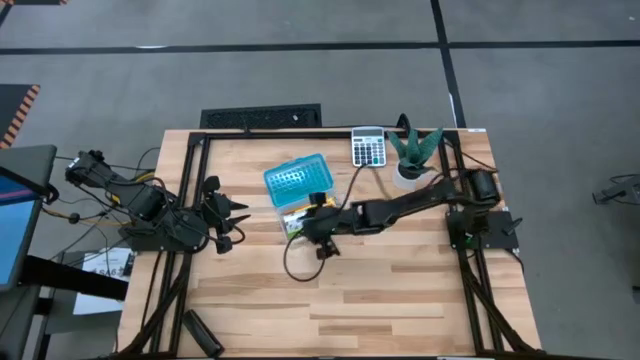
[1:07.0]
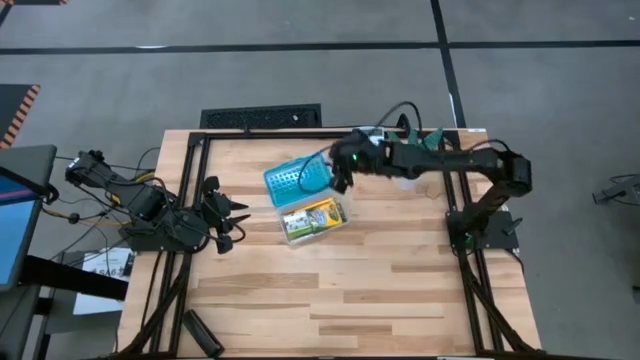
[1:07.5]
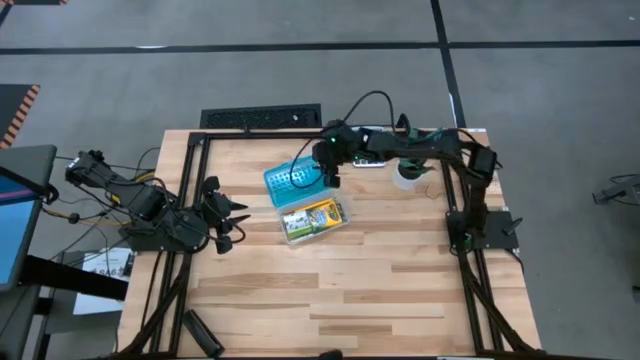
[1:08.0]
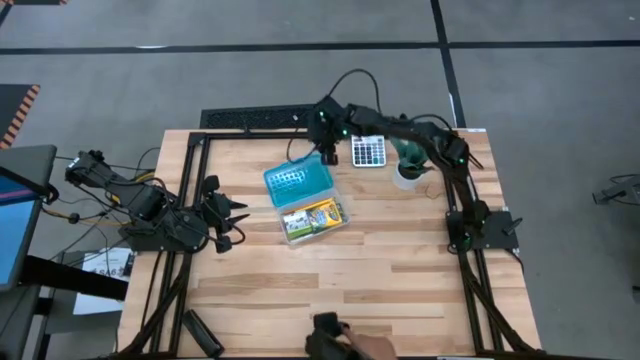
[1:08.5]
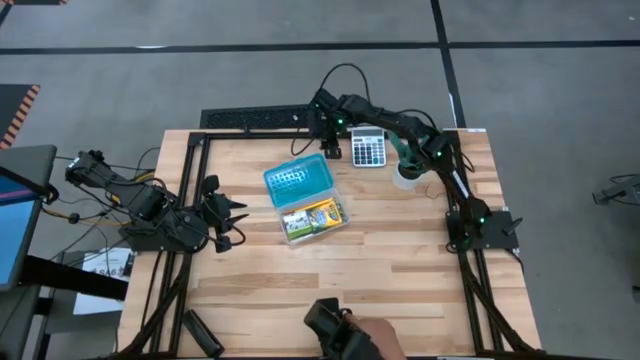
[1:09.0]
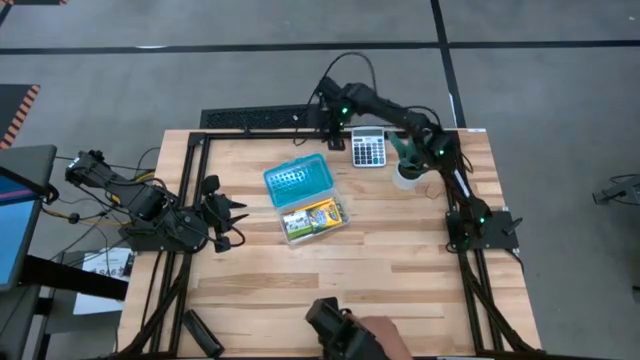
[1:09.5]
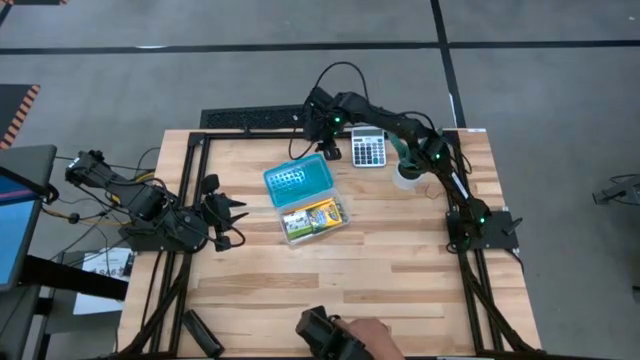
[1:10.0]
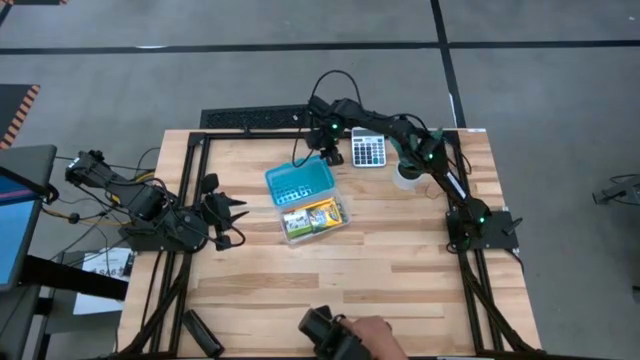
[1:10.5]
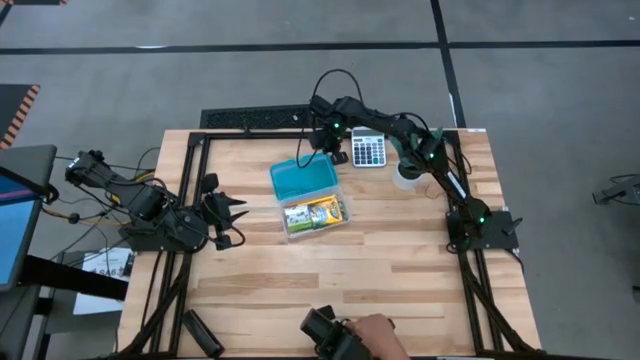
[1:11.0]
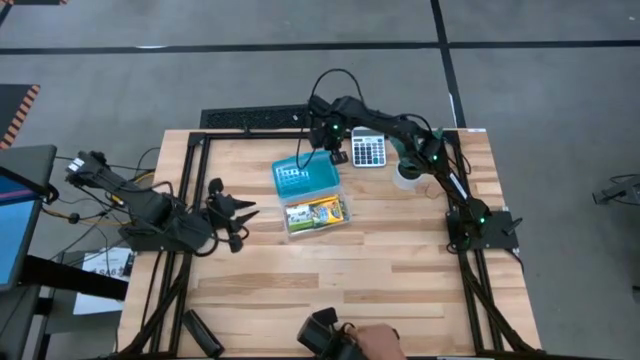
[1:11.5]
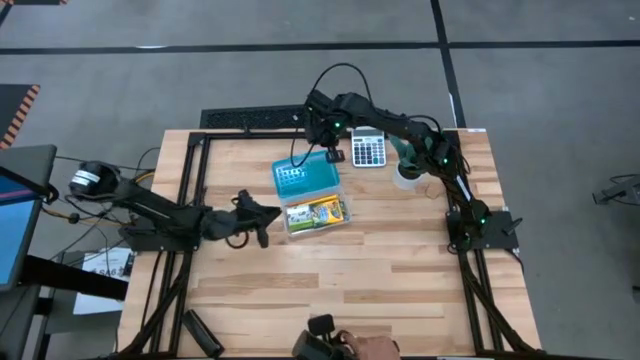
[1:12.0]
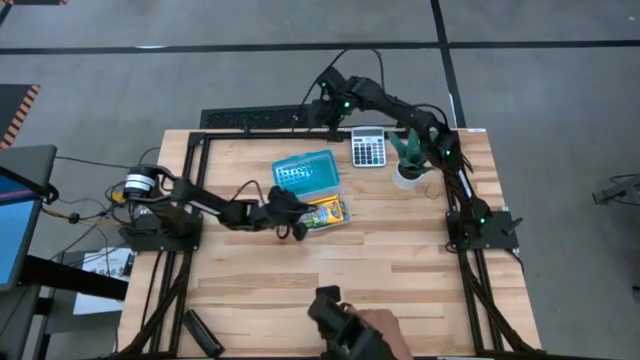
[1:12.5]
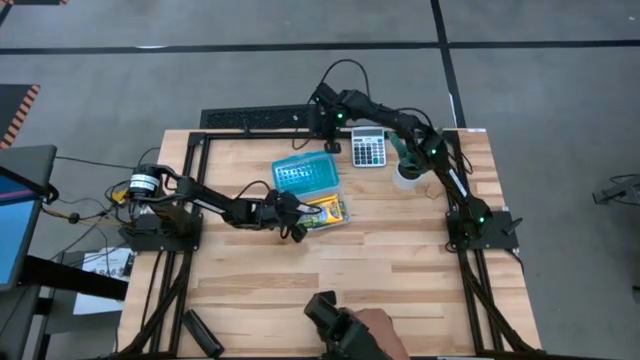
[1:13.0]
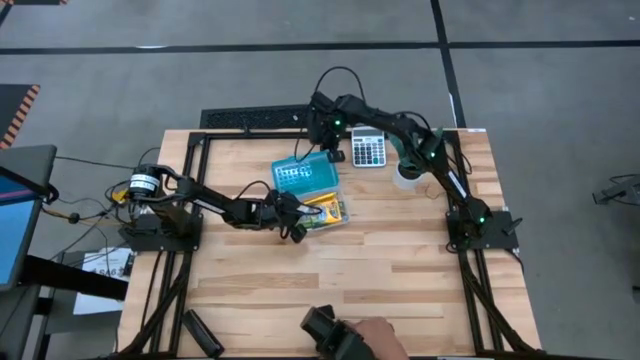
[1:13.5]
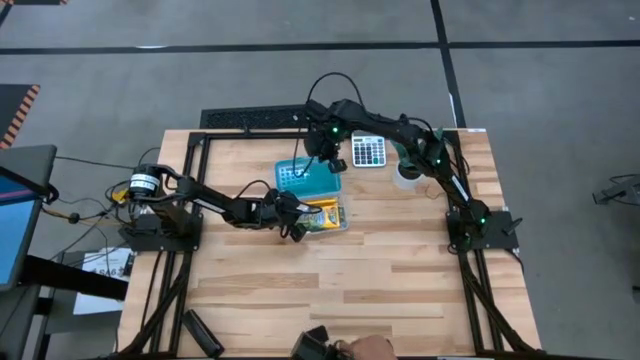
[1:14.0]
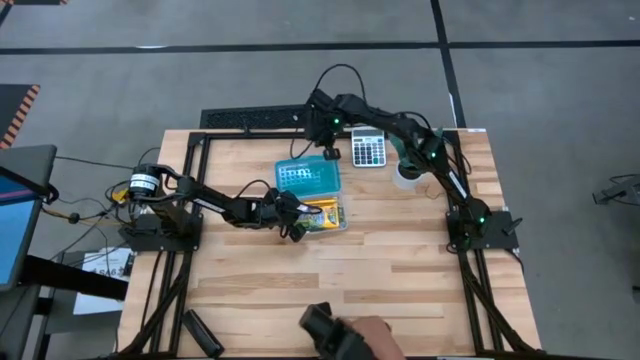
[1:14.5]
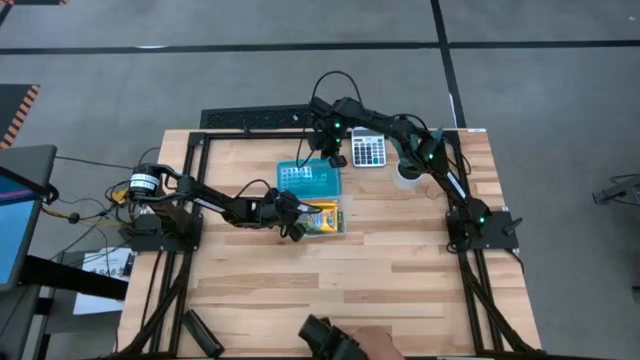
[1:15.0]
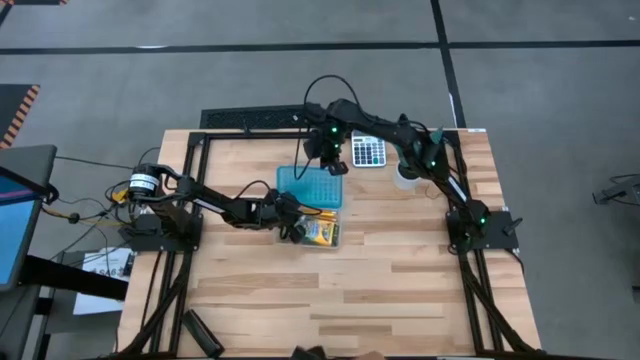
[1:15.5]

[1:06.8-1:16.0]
Task: Pack school essentials
Close the supply box

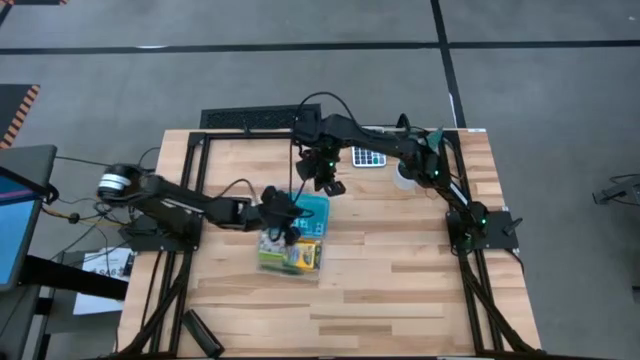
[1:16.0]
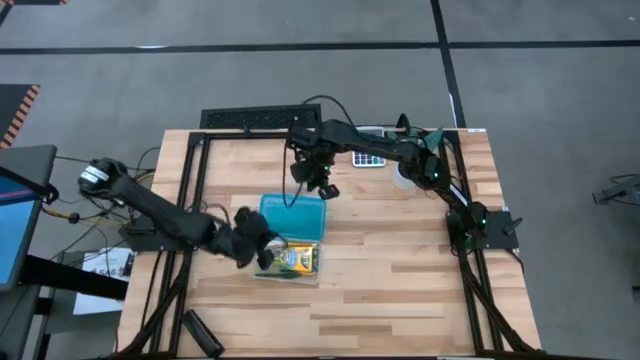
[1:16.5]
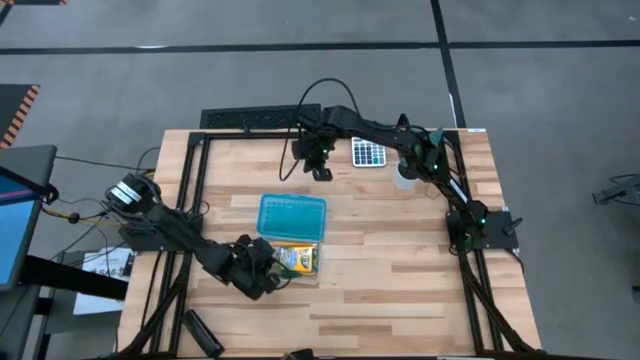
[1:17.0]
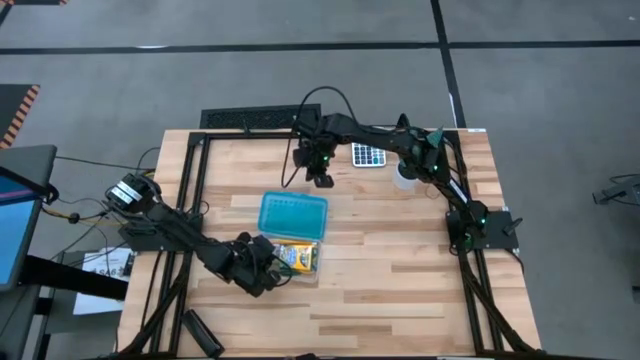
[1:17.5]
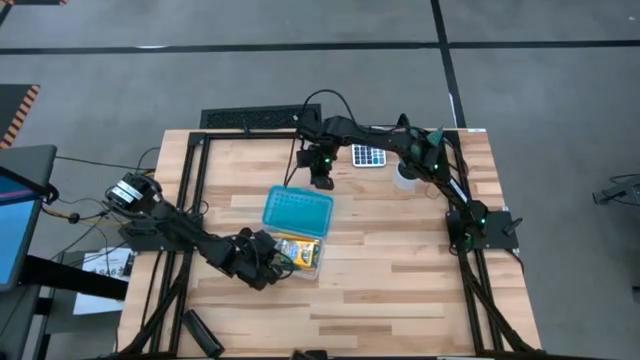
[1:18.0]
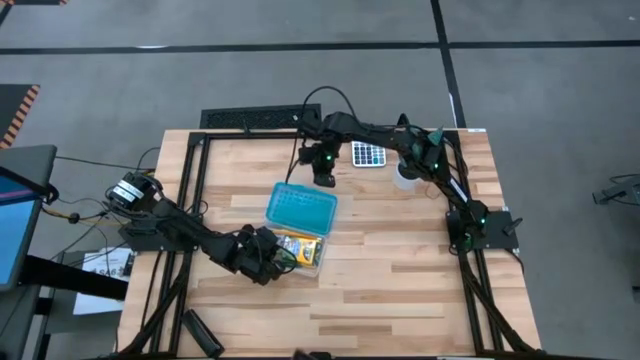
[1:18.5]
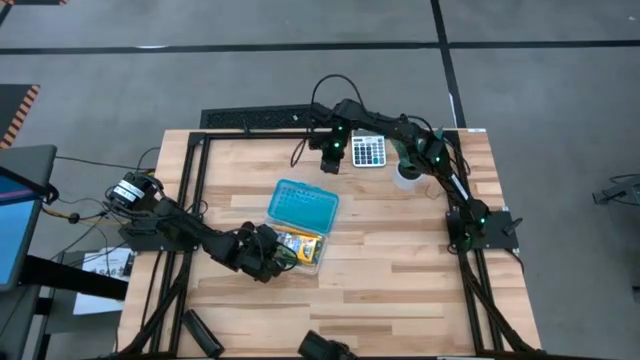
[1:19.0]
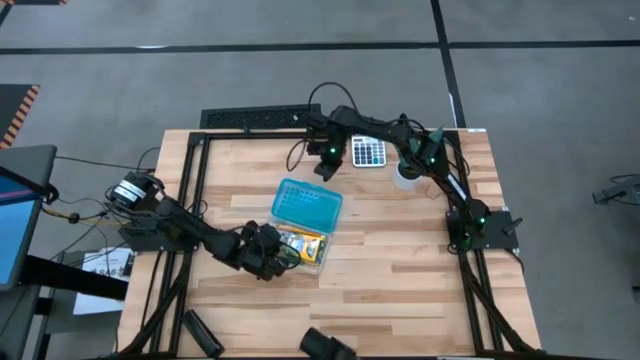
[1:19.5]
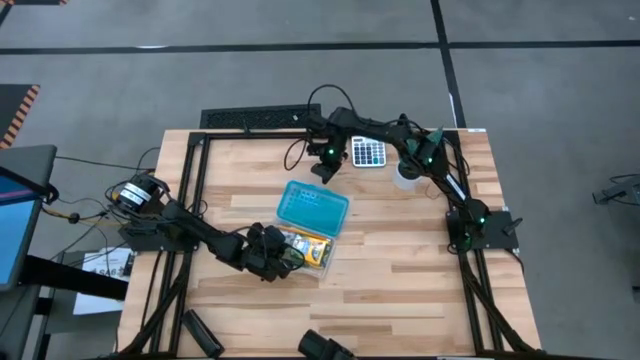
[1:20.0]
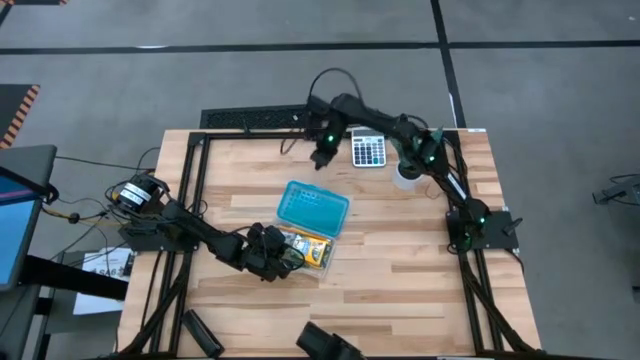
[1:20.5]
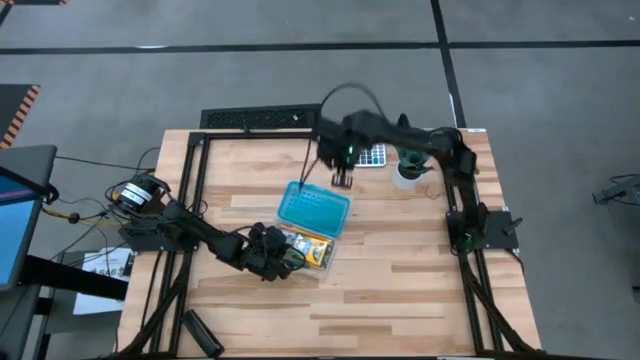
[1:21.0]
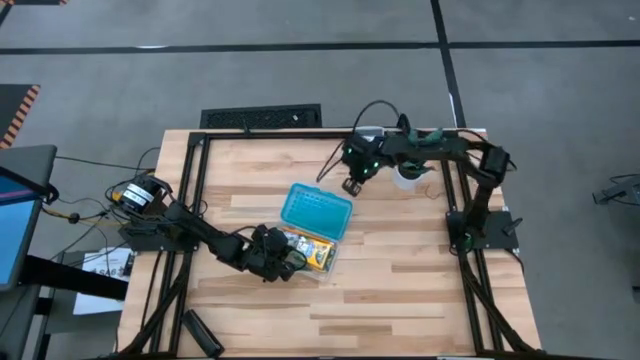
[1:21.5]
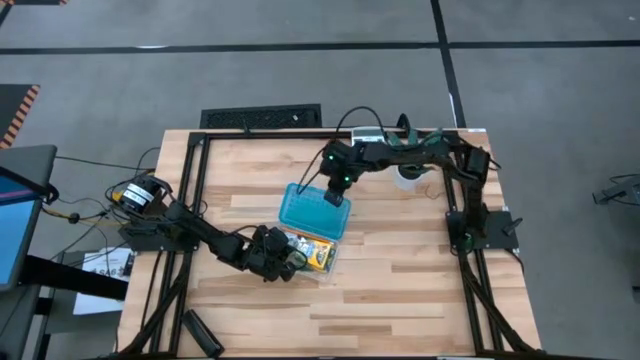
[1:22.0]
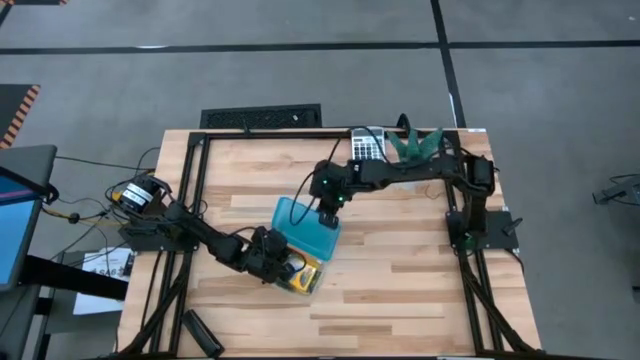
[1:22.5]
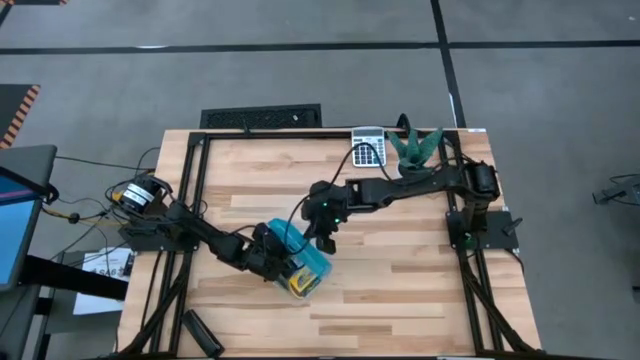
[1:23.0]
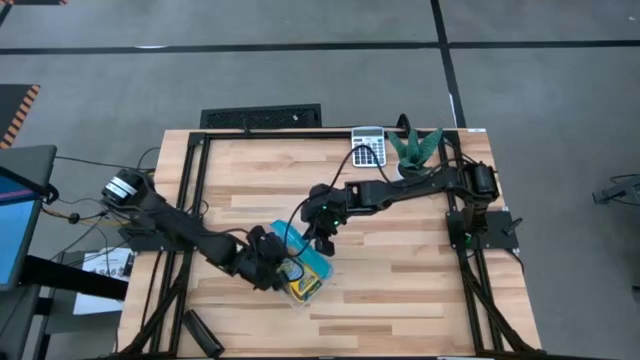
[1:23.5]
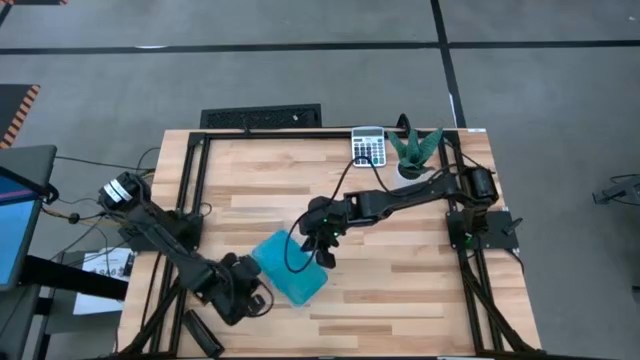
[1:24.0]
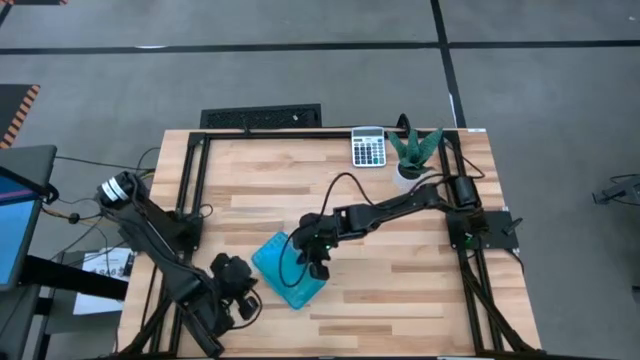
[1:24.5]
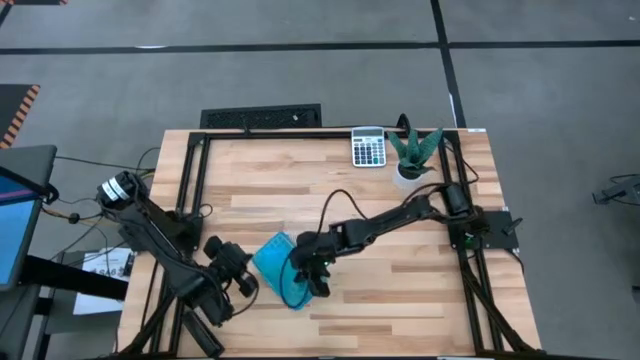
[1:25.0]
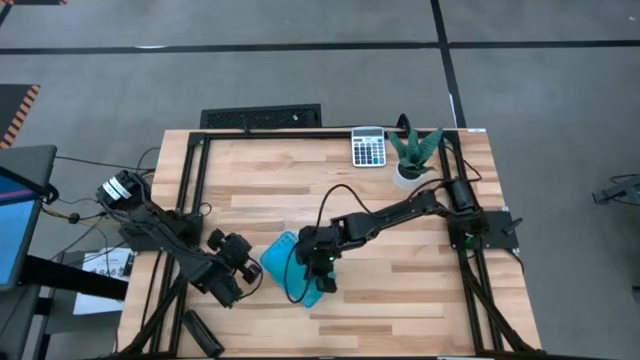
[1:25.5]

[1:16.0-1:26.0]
Close the supply box

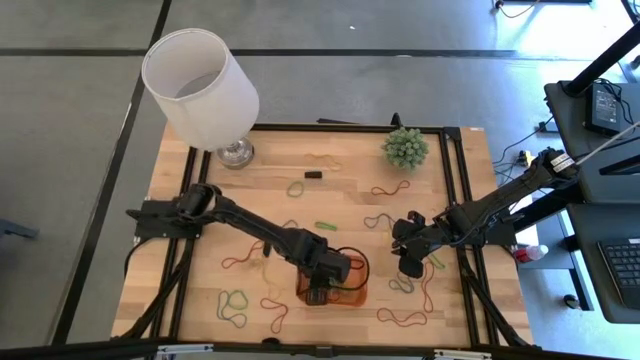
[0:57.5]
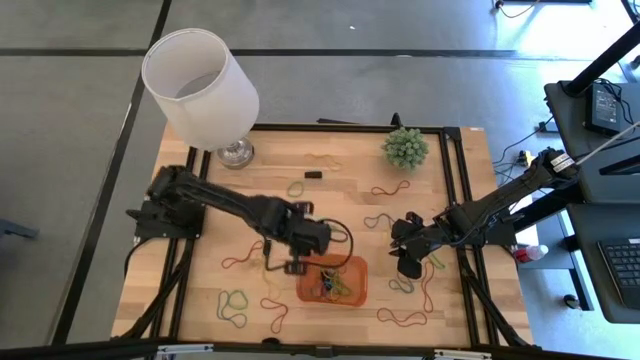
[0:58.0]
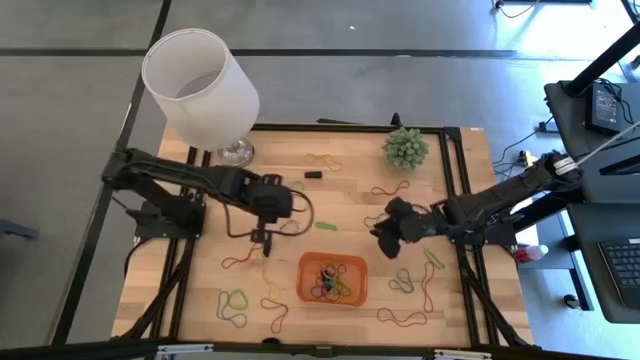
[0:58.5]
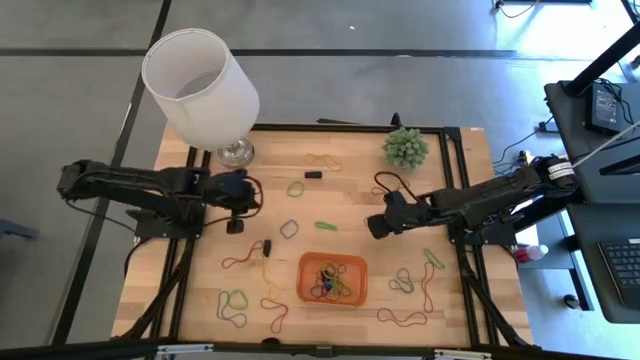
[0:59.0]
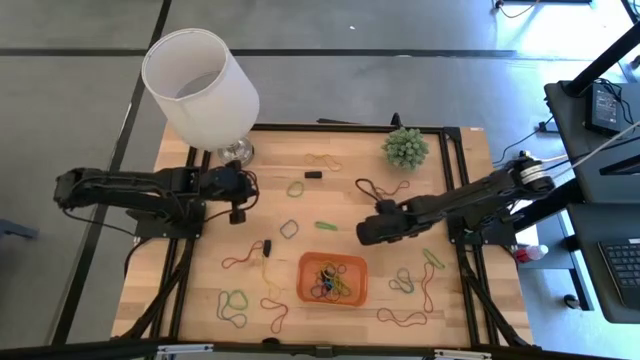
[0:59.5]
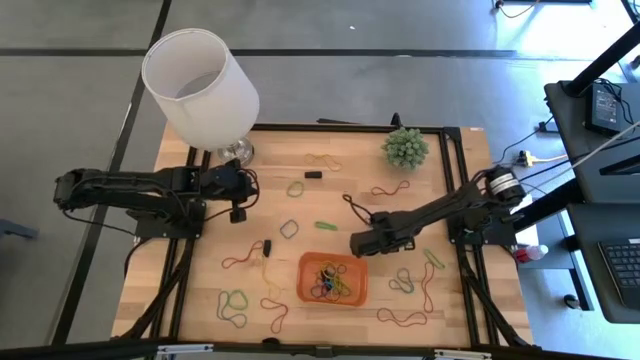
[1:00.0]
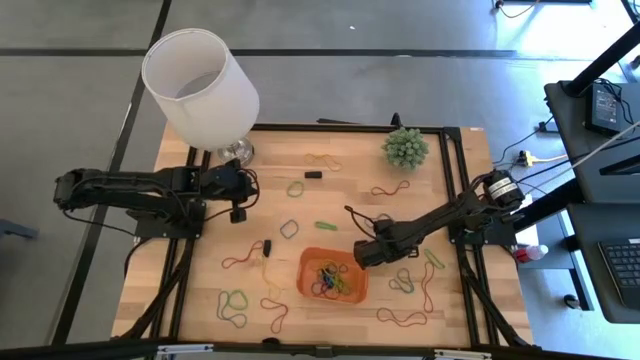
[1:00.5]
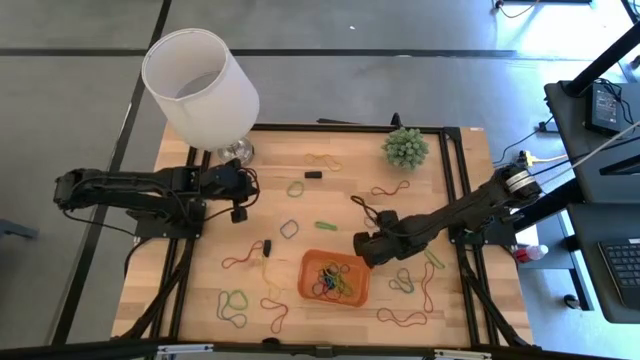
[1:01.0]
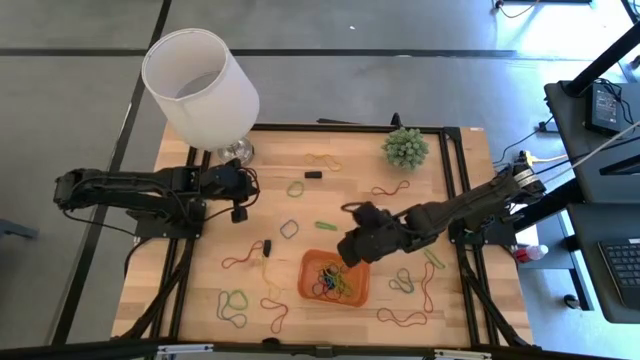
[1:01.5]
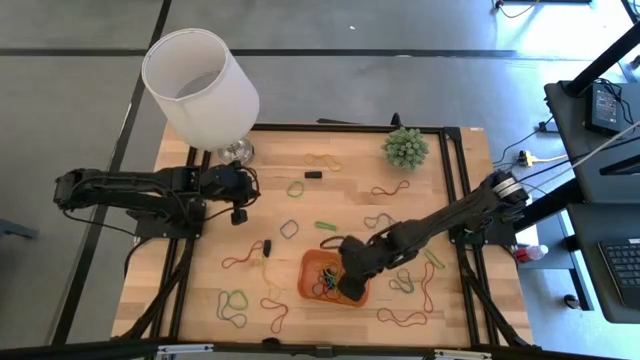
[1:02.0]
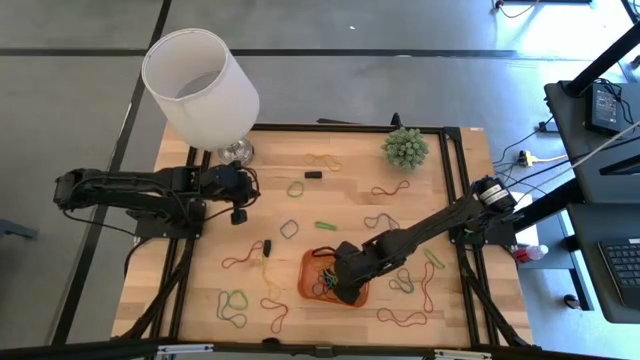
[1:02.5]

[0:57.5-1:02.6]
Task: Pick and place rubber bands into bin
Put the yellow rubber band into the orange bin
